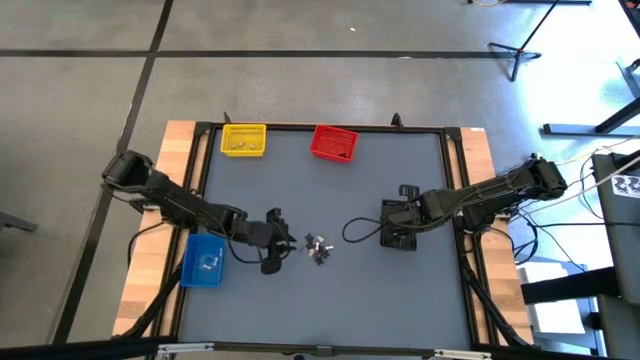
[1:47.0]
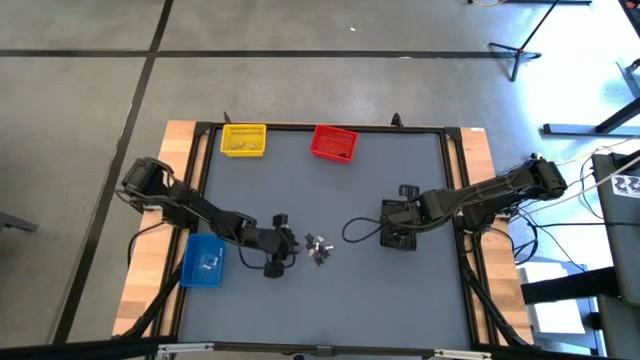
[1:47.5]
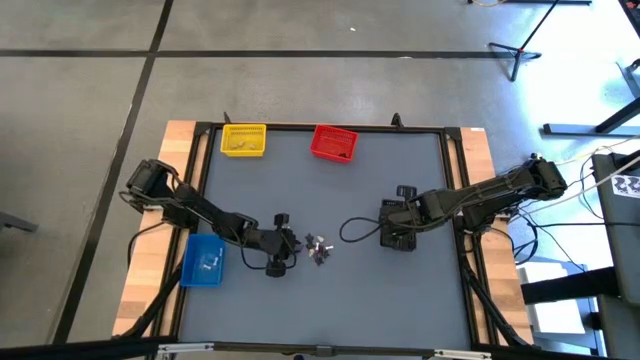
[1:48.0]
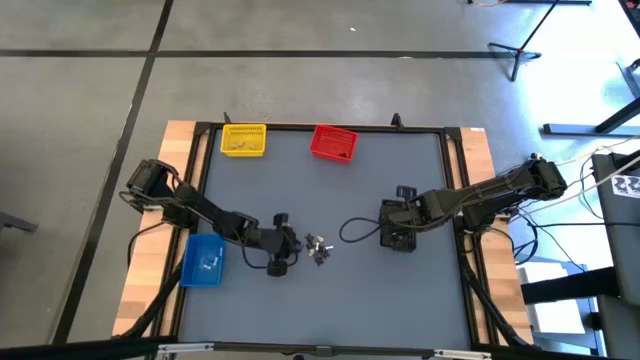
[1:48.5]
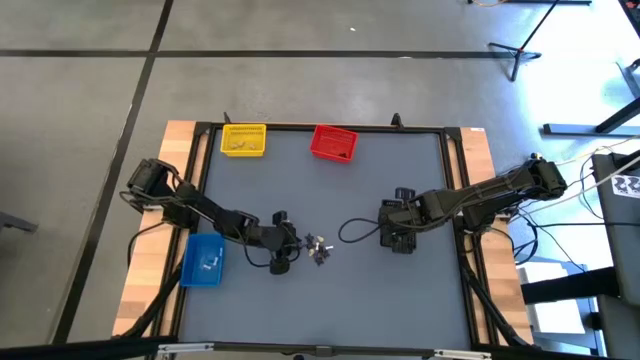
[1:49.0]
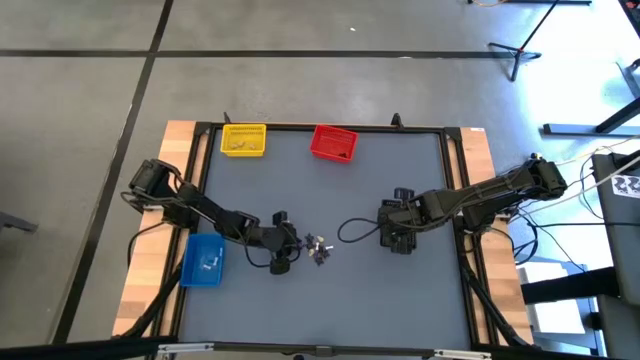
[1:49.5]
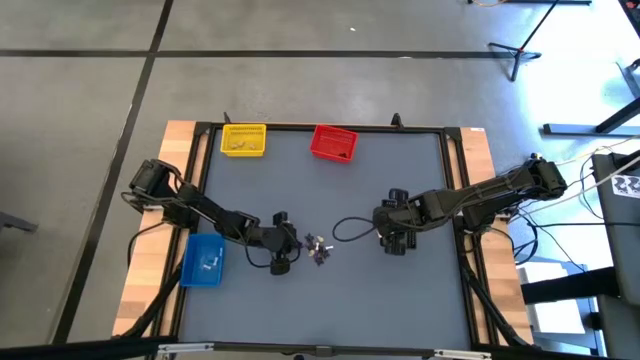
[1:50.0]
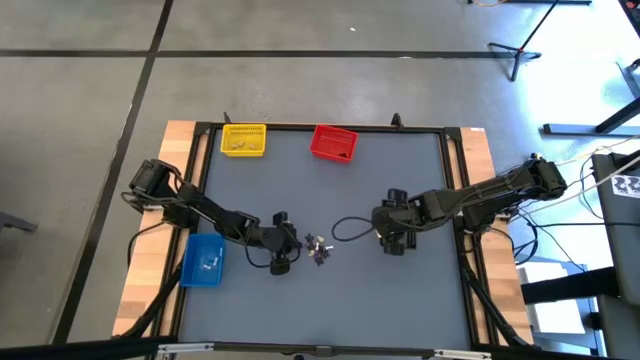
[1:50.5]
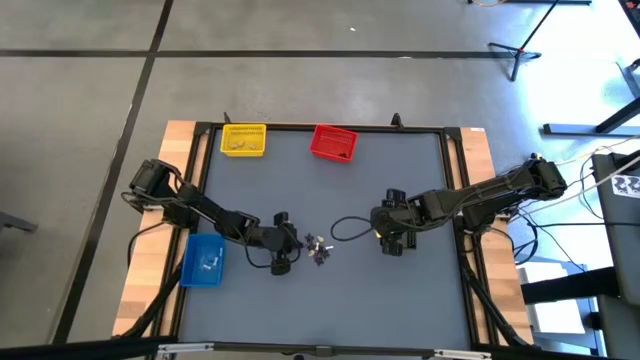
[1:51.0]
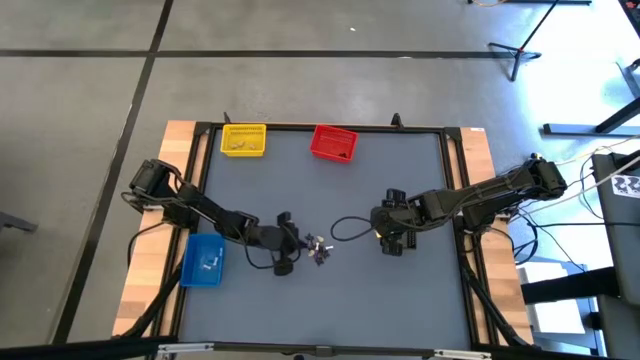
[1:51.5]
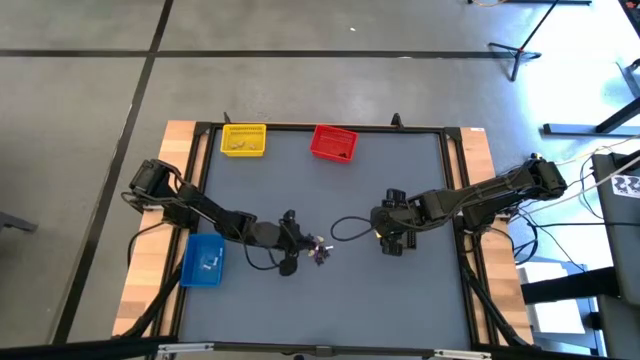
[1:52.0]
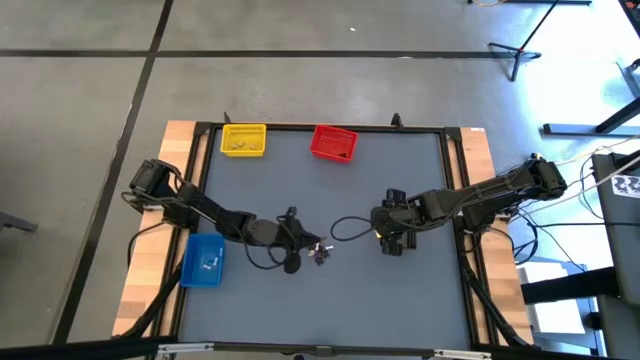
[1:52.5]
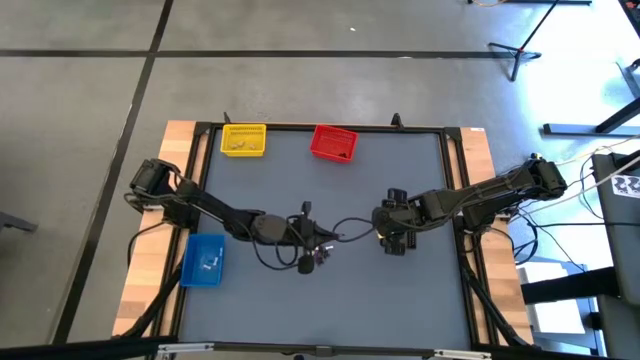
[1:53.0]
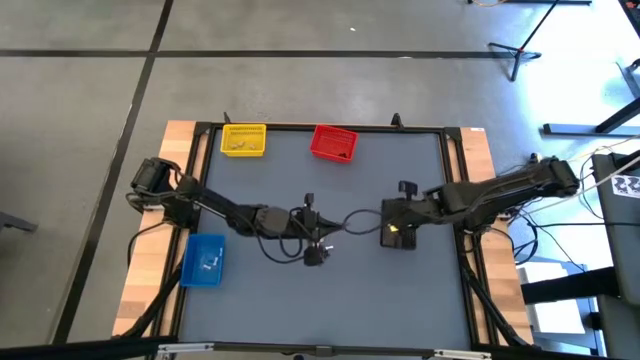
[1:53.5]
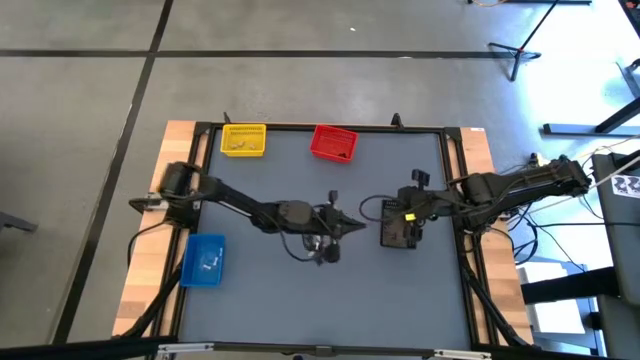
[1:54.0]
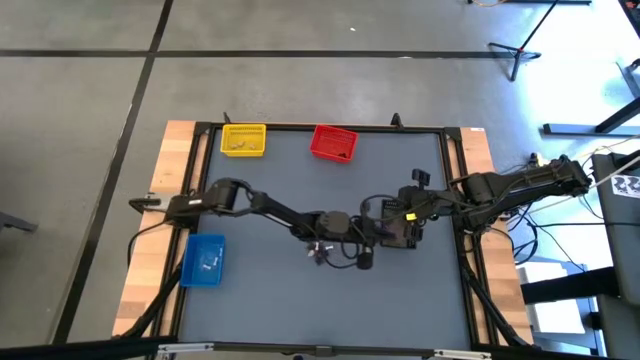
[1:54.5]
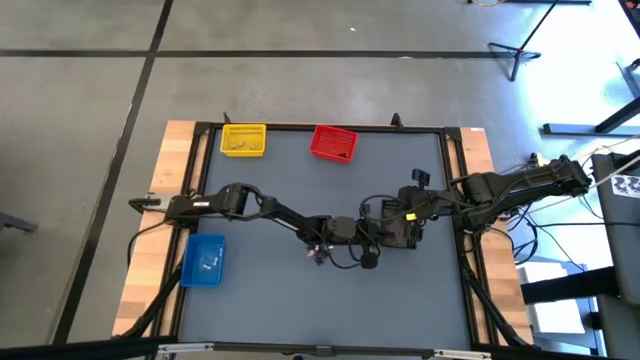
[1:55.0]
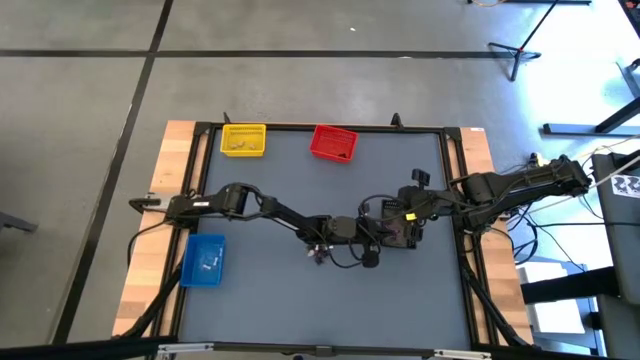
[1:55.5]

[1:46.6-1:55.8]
Task: Sort Halloween decoration
Put the purple hat toy into the black bin

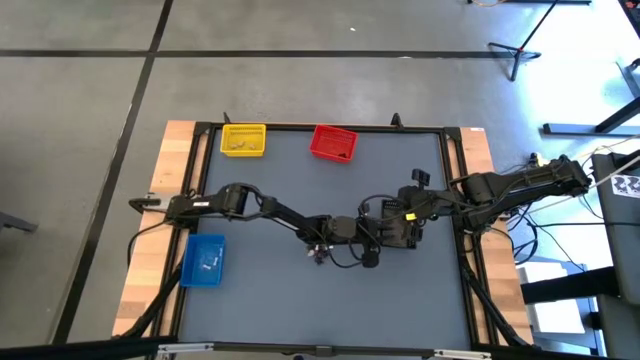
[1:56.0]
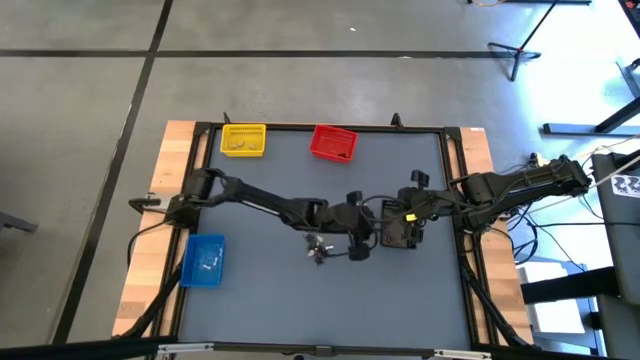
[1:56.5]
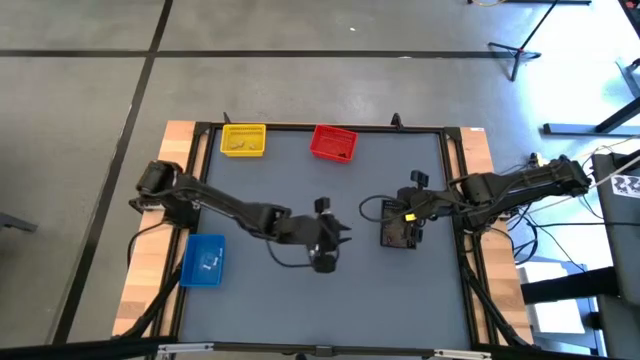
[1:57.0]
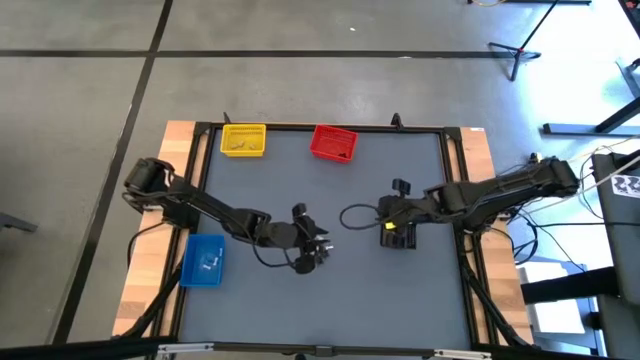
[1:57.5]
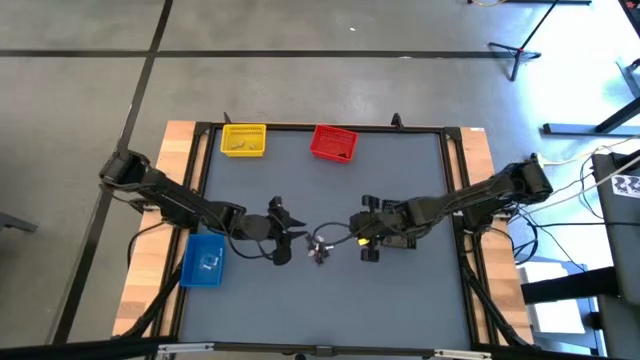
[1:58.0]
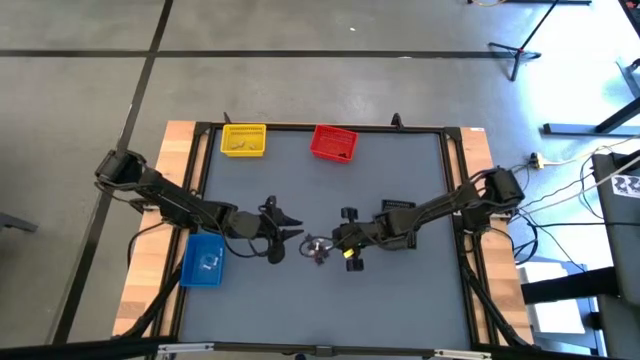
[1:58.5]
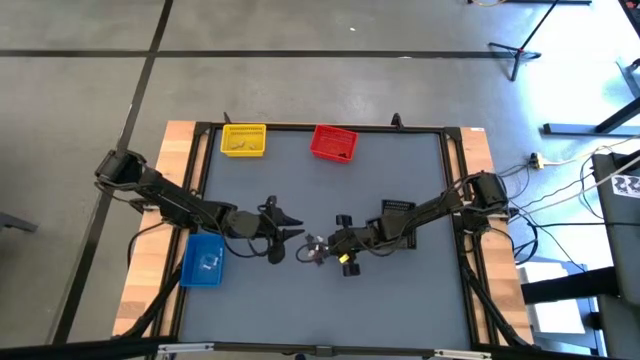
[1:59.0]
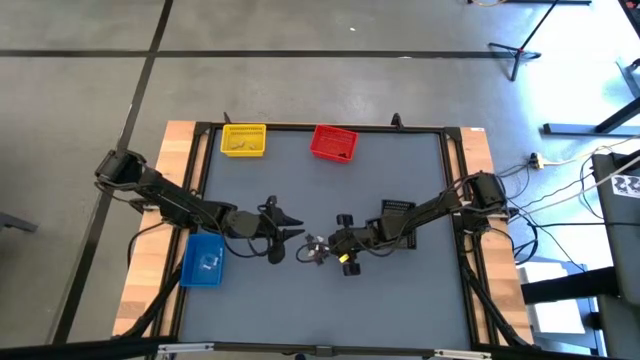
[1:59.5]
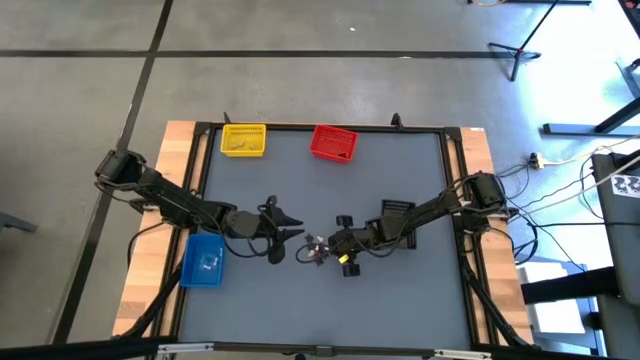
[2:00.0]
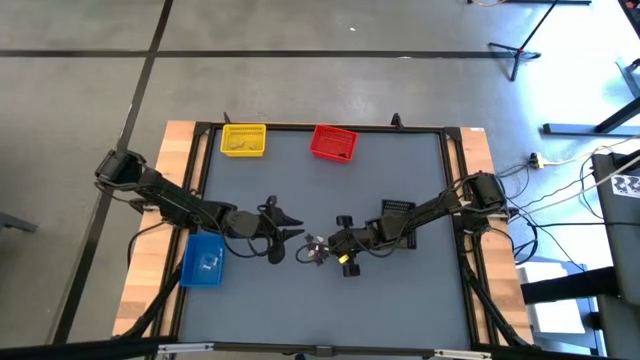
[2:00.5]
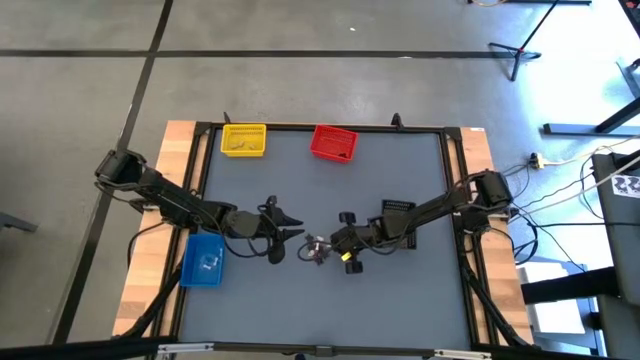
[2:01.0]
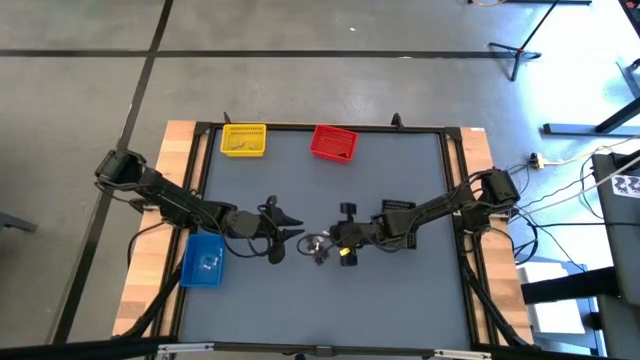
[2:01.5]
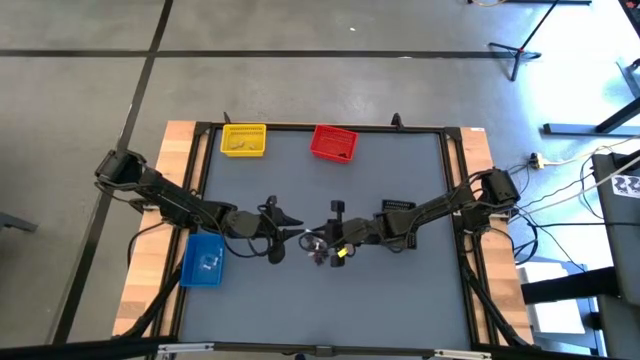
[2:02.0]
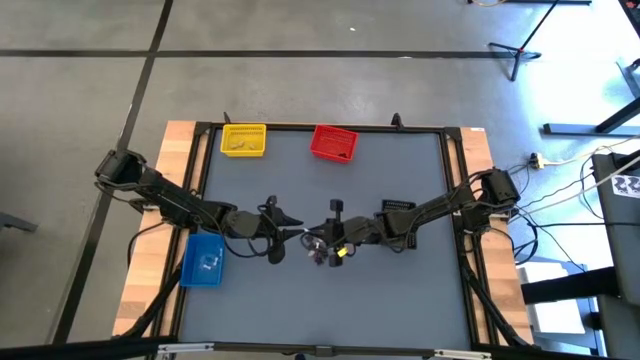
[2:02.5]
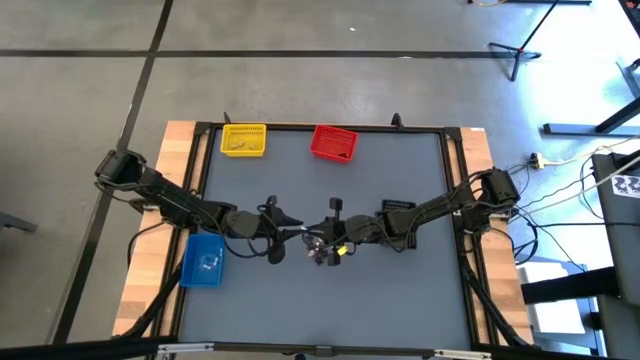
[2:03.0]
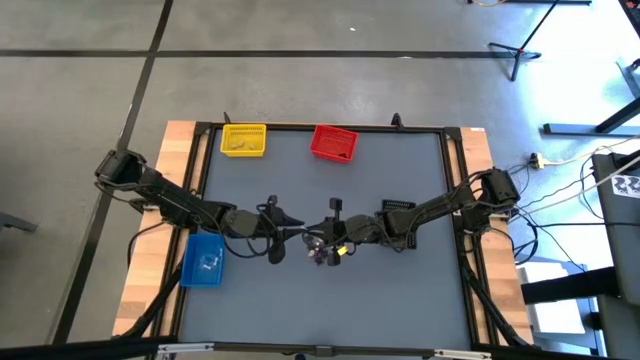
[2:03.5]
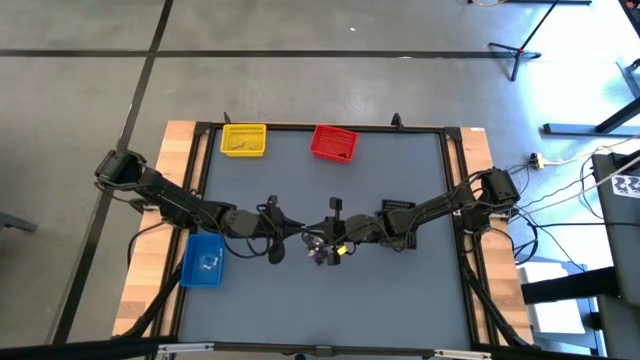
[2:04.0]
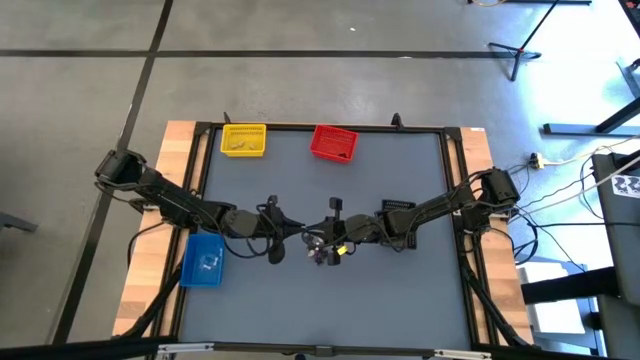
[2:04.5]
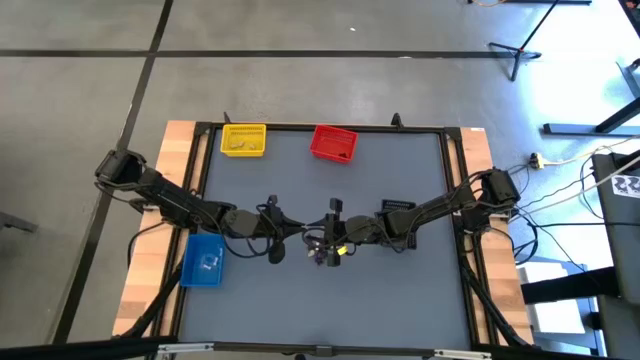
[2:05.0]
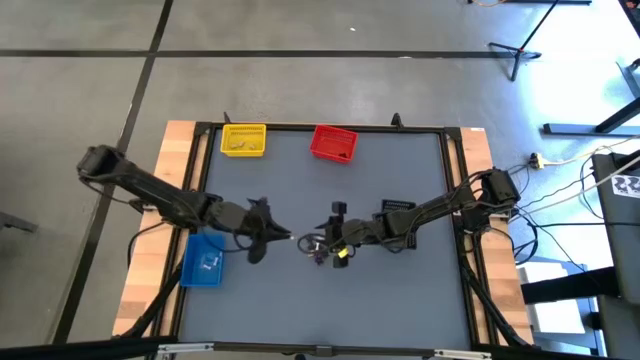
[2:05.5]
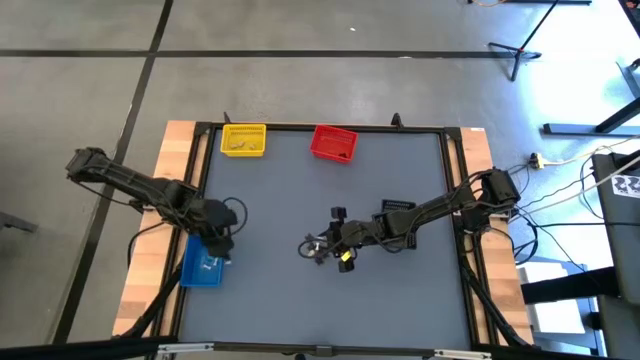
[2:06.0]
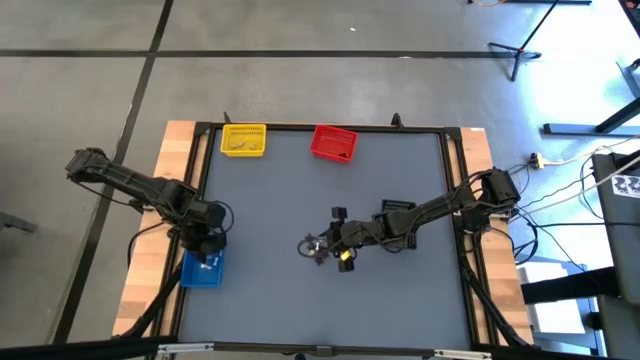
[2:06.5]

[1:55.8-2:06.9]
Put the white bone toy into the blue bin

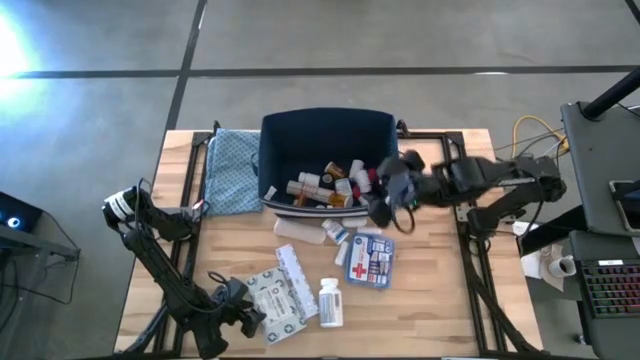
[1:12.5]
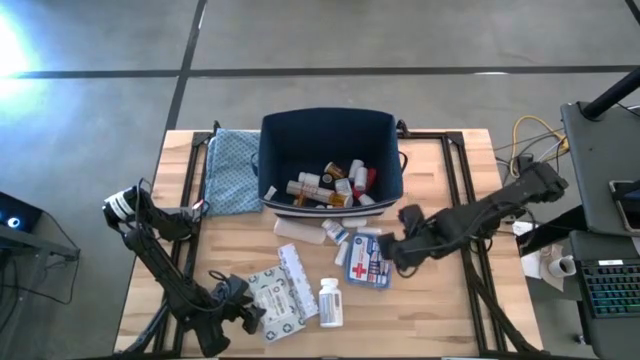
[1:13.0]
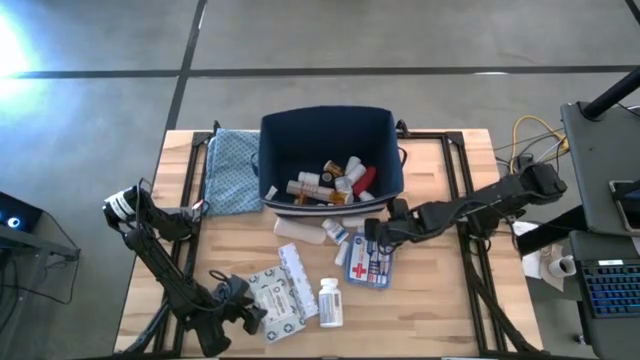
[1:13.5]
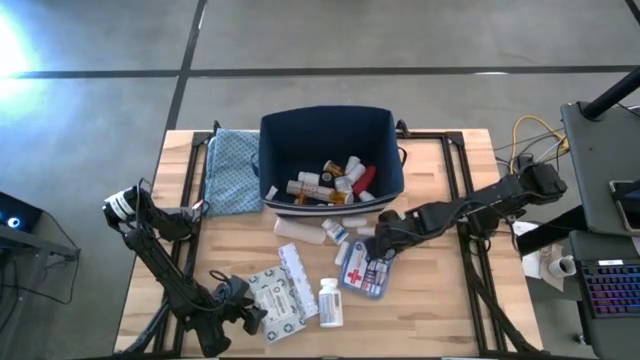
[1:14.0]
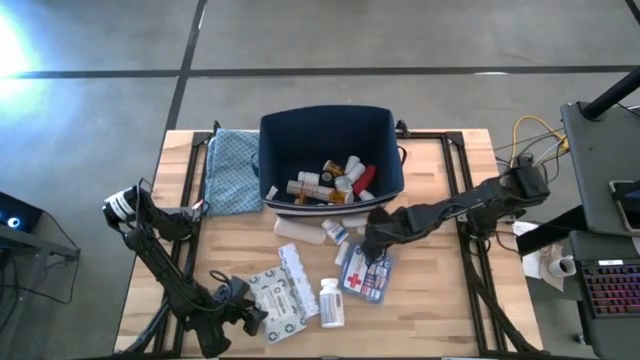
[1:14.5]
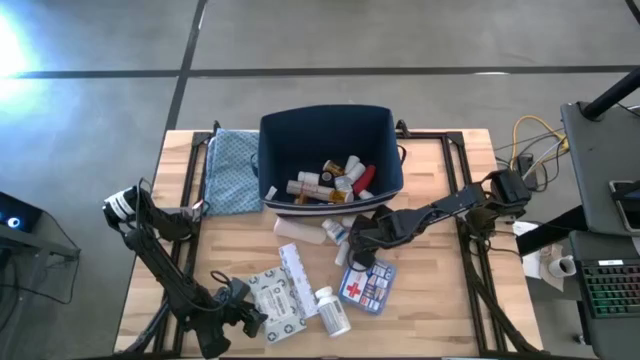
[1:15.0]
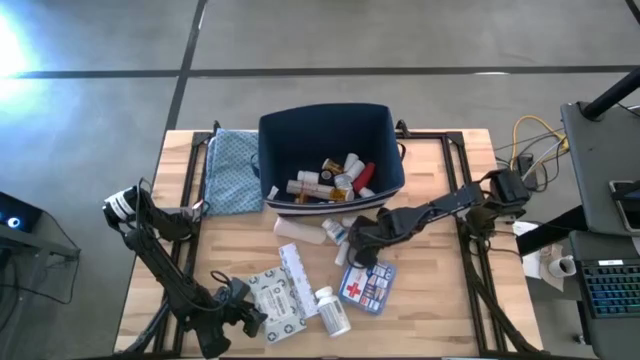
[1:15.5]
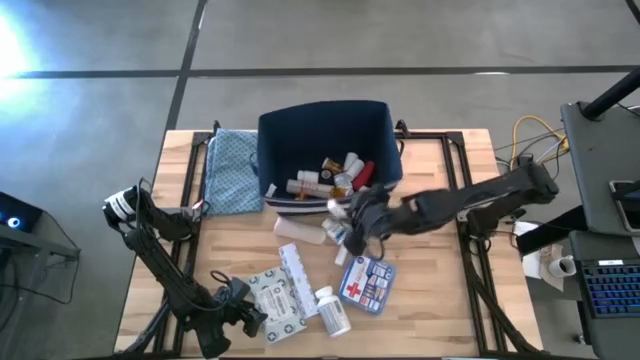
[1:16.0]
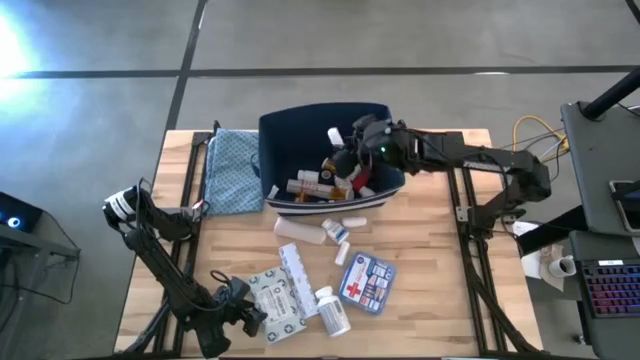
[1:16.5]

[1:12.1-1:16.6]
Task: Pick & place medical supplies in basket/bin
Put the white rolled gauze into the blue bin
